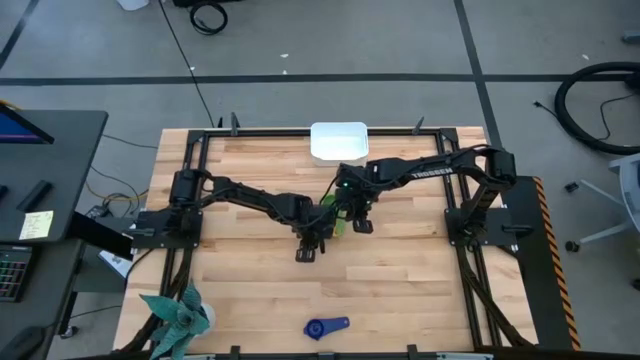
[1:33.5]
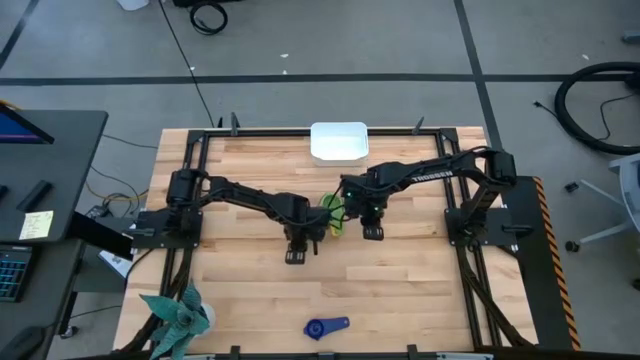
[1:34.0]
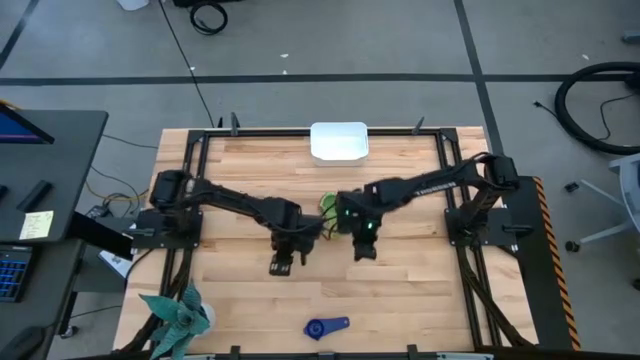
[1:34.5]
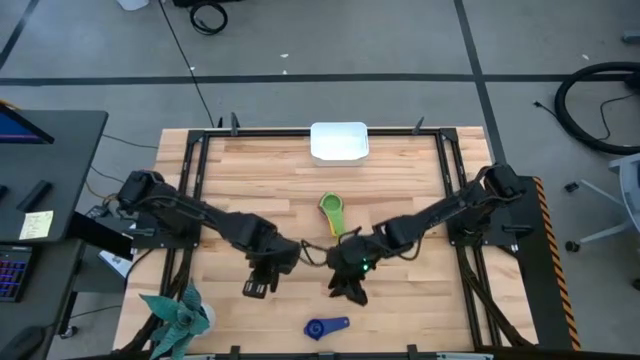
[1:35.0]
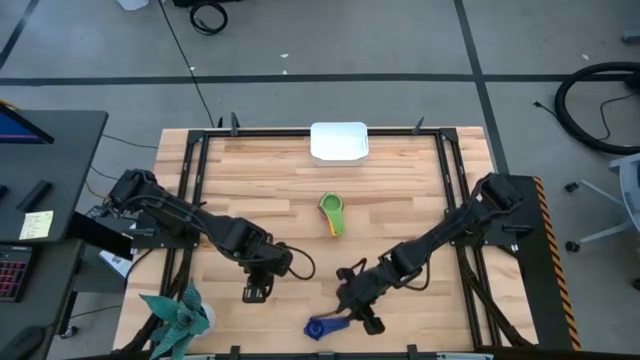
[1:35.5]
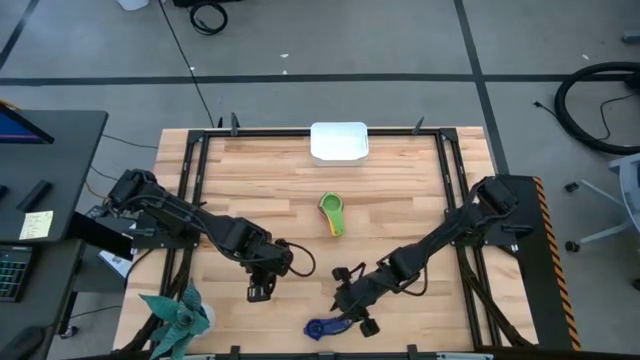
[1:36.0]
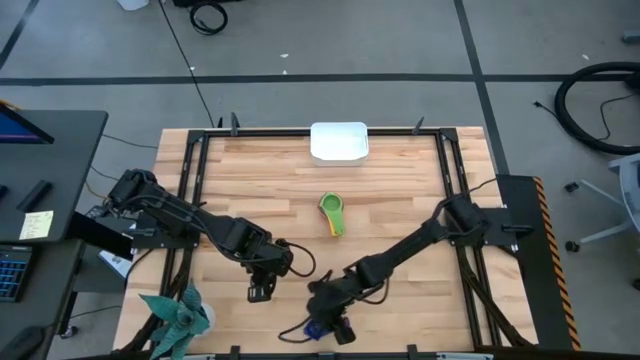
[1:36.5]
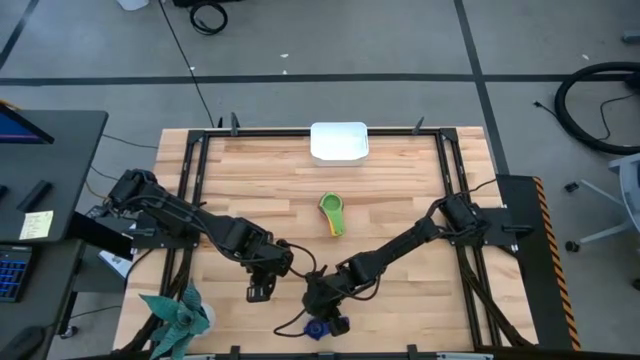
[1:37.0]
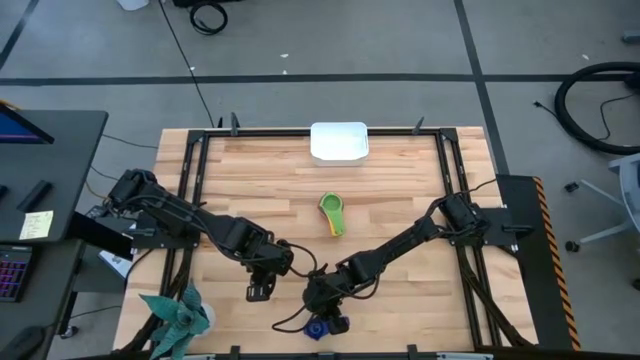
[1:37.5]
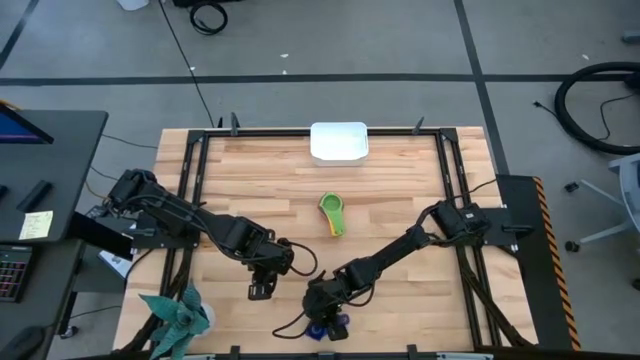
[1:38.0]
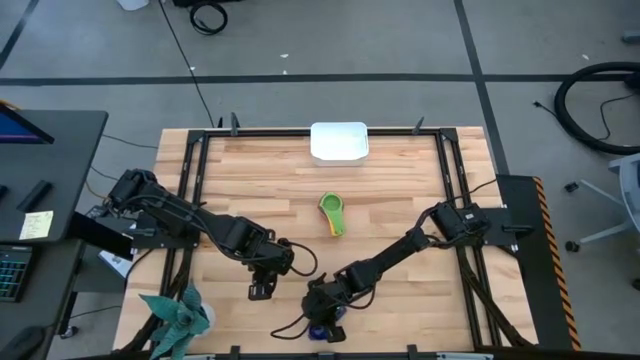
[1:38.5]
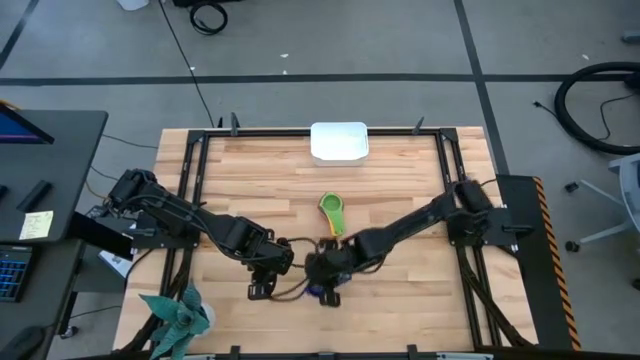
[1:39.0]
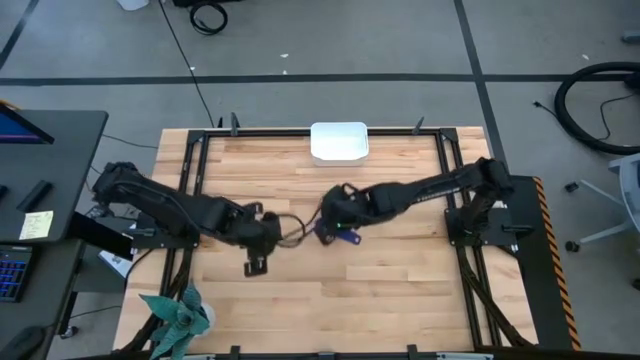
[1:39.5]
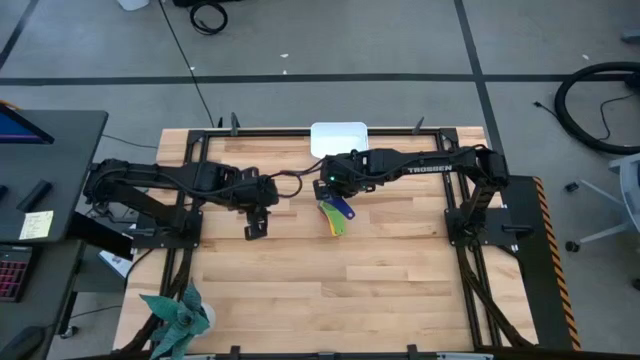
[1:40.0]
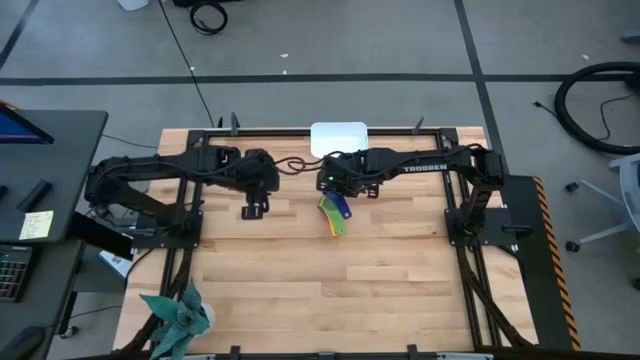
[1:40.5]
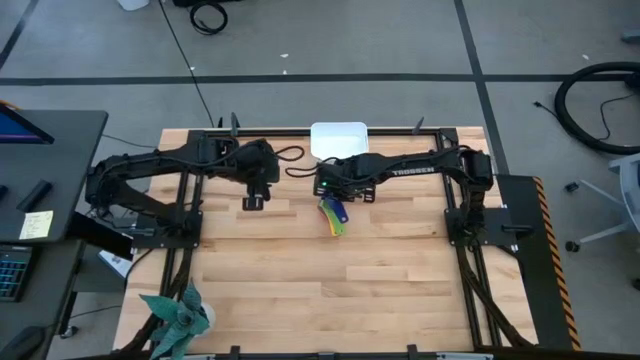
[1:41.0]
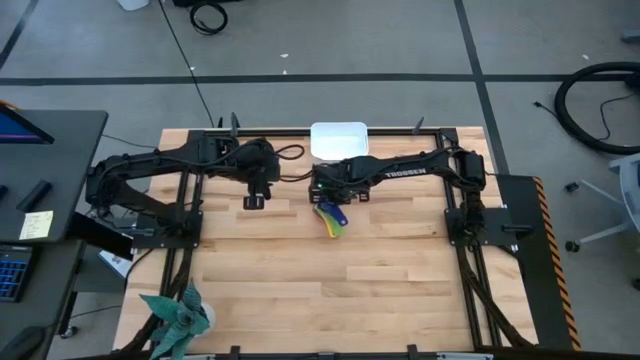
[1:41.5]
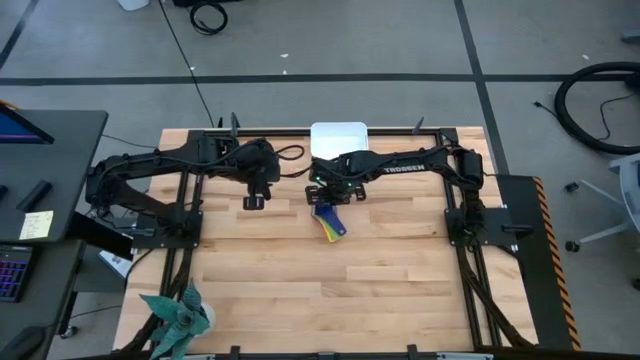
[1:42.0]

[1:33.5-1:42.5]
Task: Nest measuring cups in basket
Stack the dark blue measuring cup on the green measuring cup

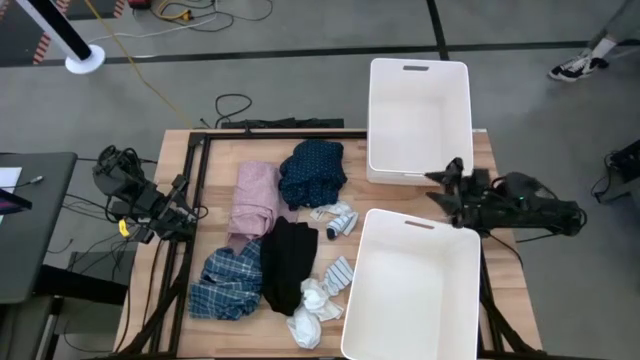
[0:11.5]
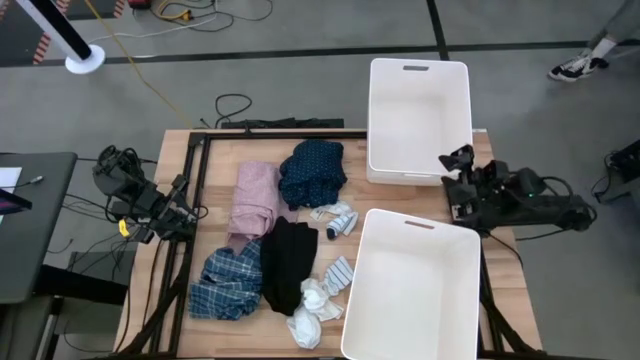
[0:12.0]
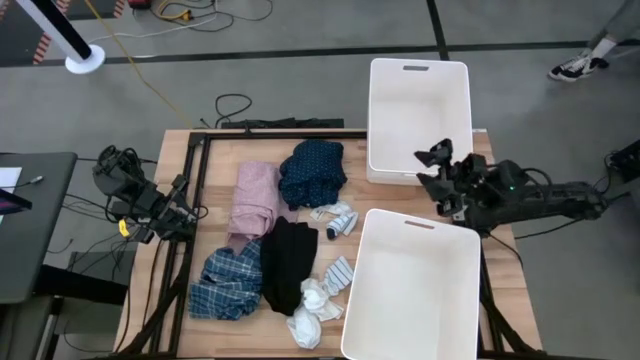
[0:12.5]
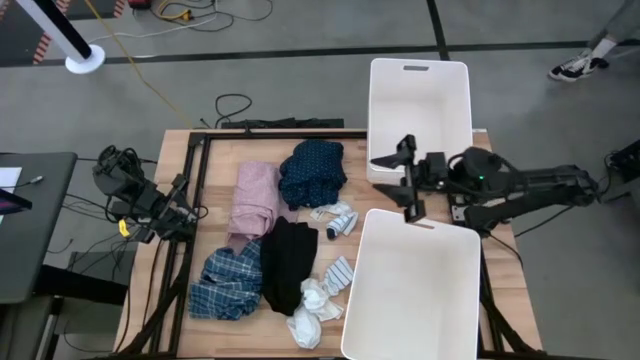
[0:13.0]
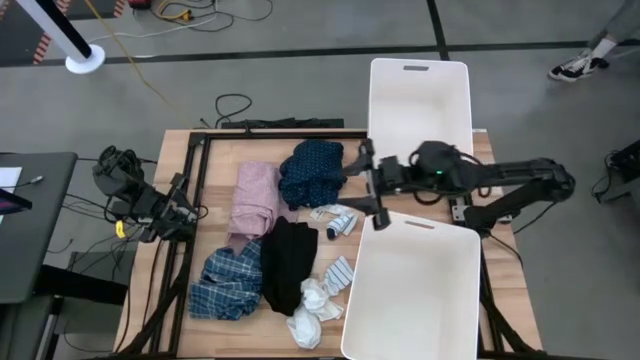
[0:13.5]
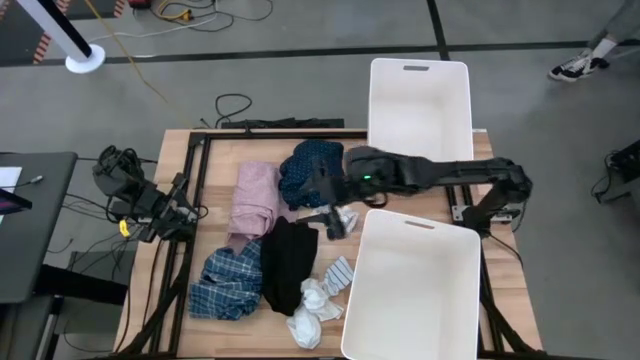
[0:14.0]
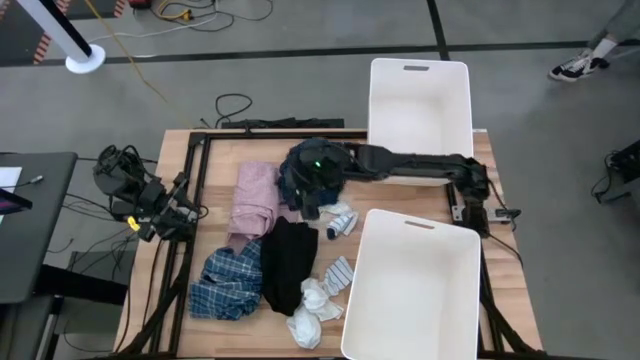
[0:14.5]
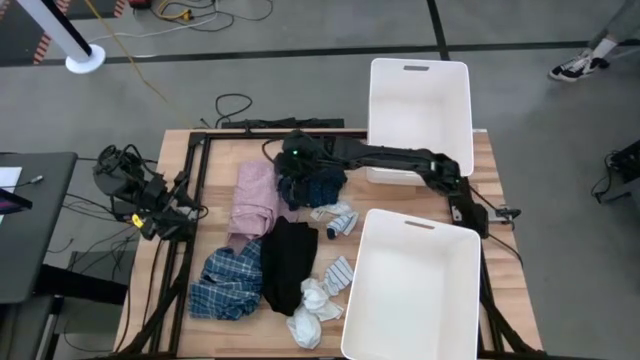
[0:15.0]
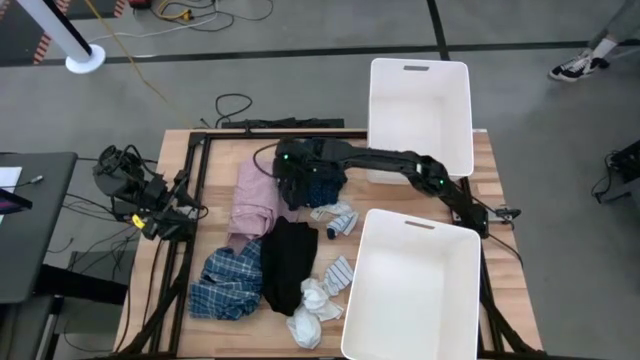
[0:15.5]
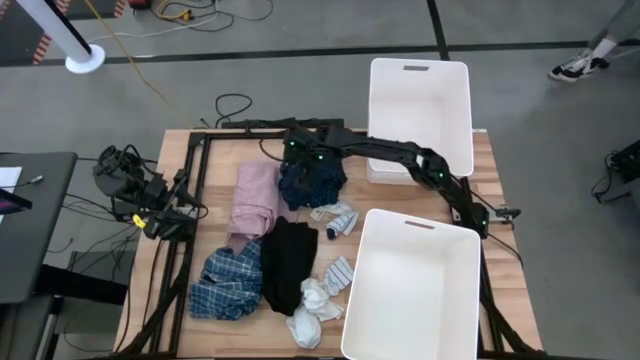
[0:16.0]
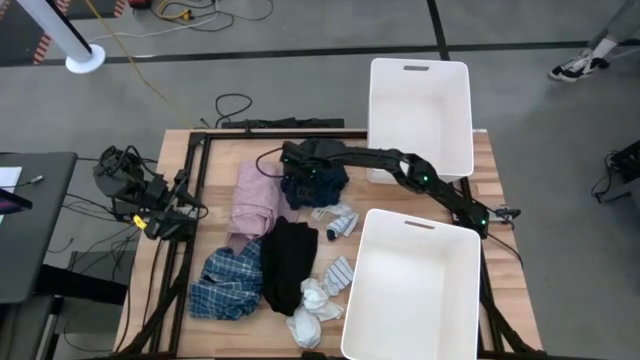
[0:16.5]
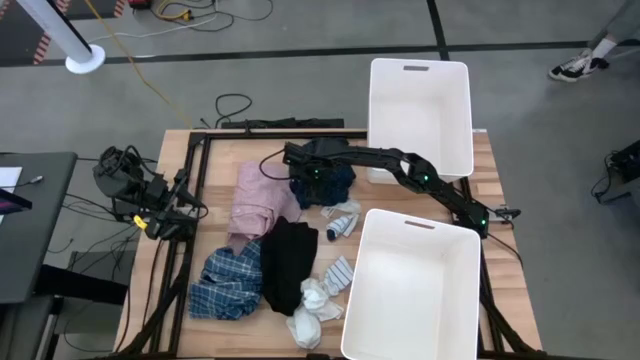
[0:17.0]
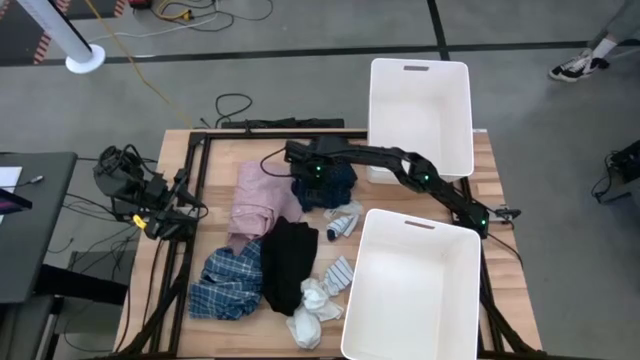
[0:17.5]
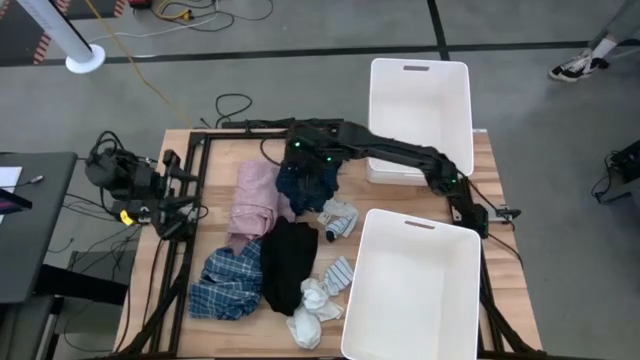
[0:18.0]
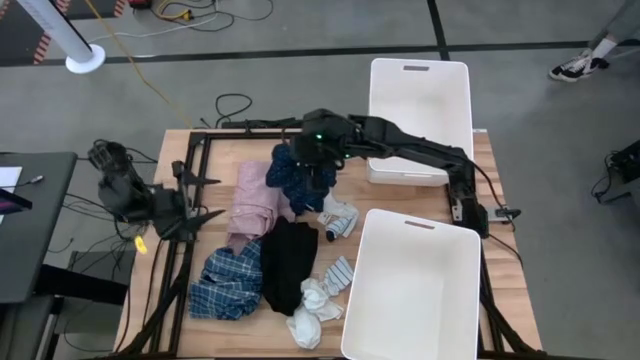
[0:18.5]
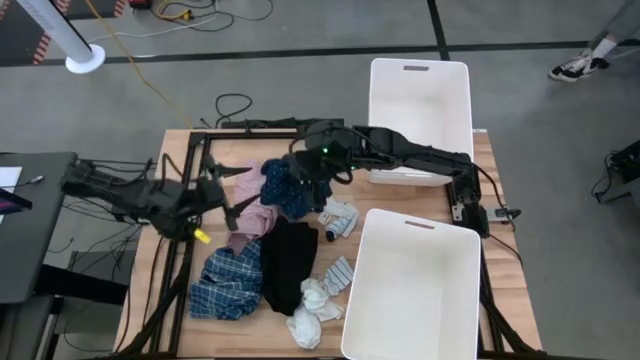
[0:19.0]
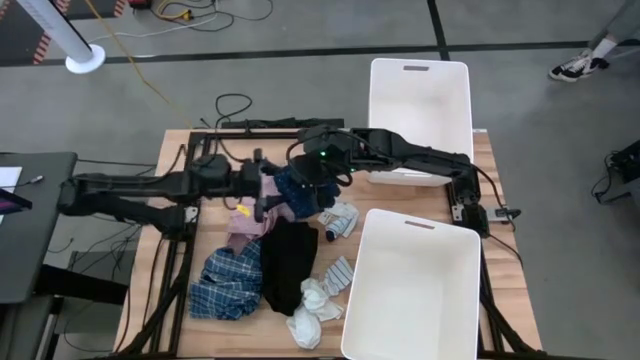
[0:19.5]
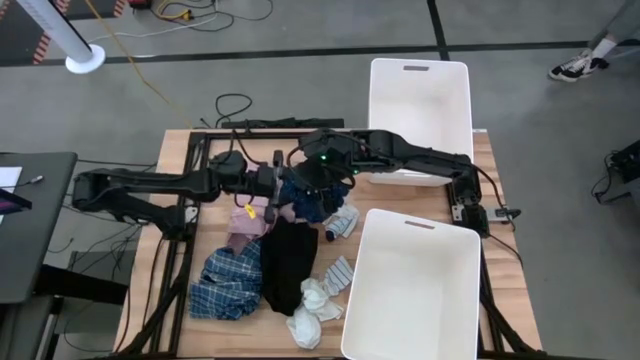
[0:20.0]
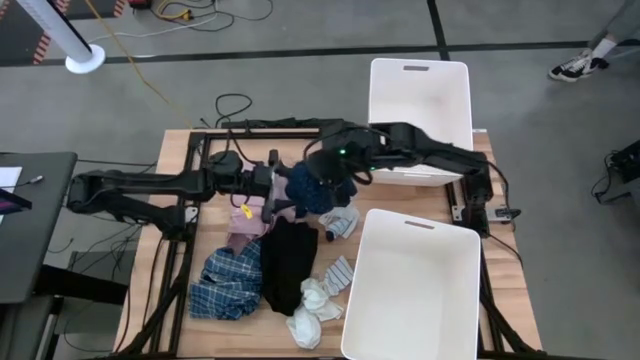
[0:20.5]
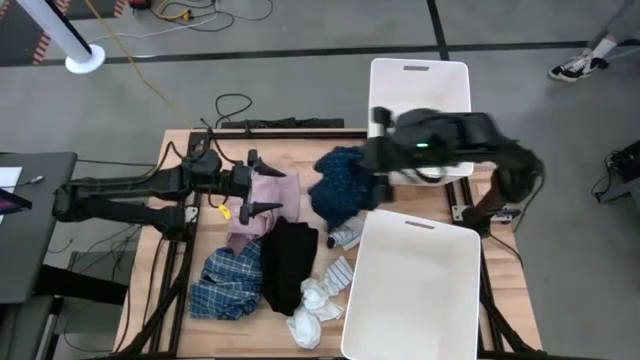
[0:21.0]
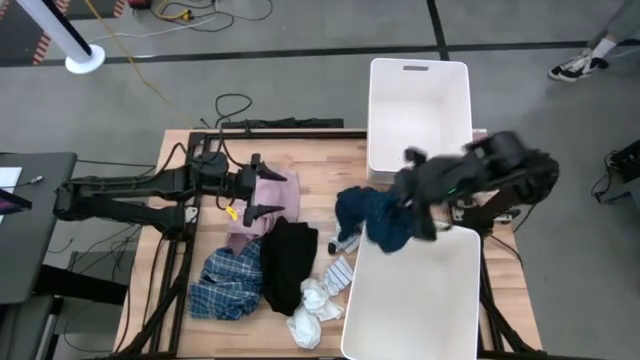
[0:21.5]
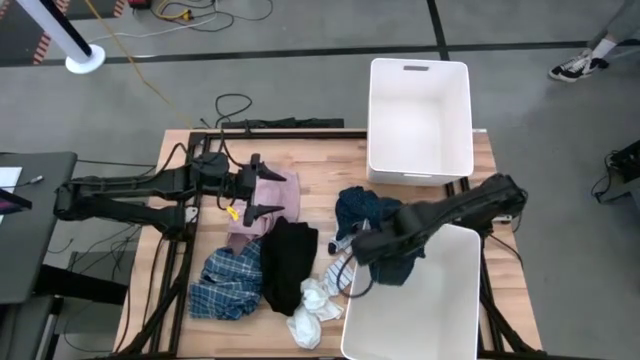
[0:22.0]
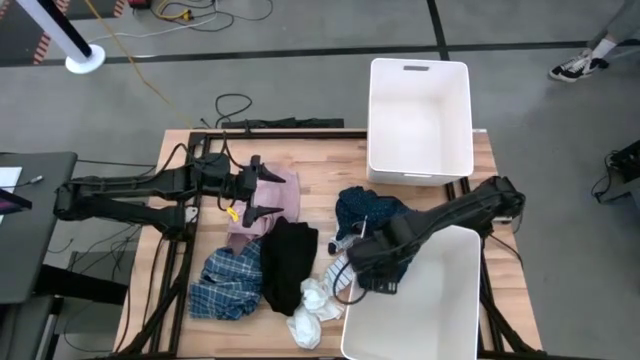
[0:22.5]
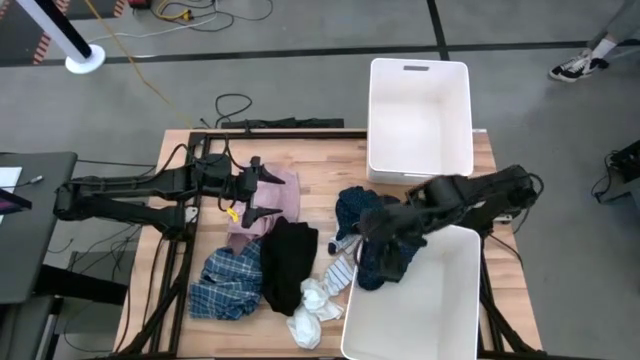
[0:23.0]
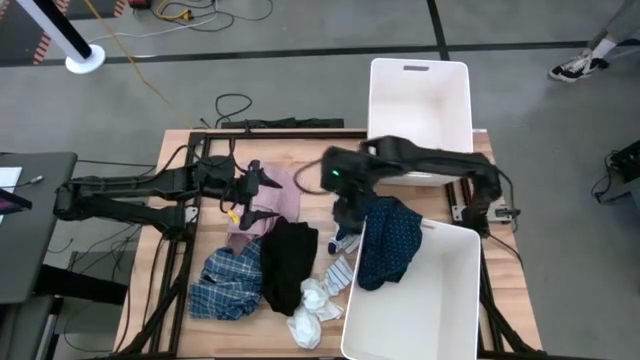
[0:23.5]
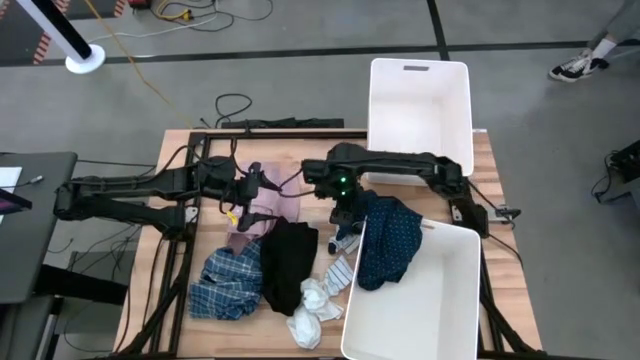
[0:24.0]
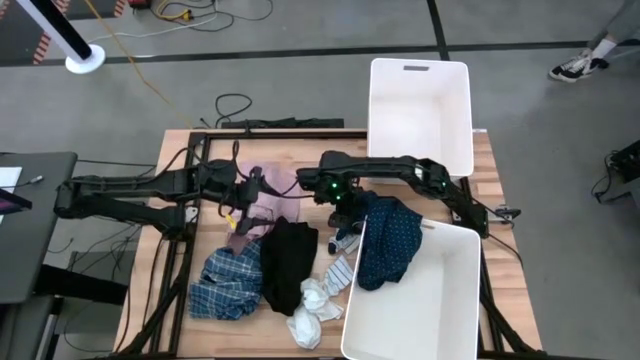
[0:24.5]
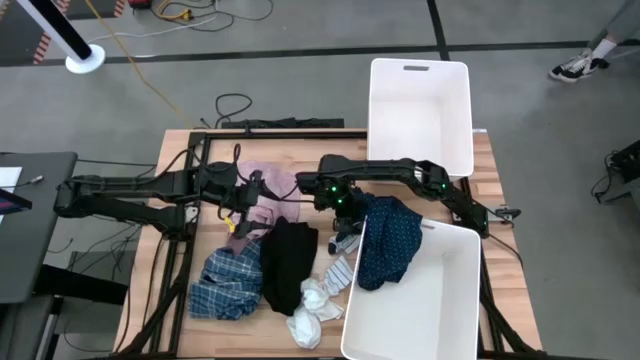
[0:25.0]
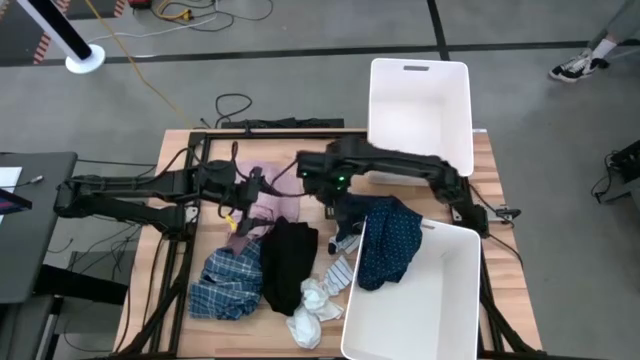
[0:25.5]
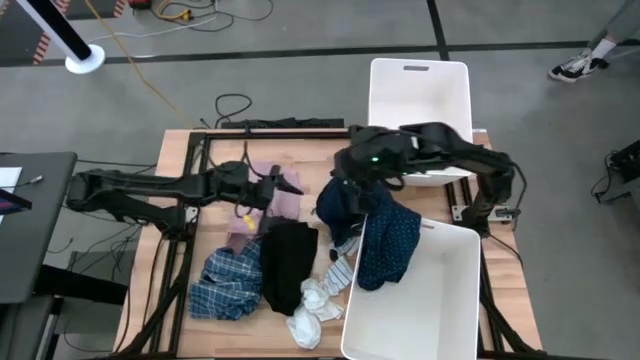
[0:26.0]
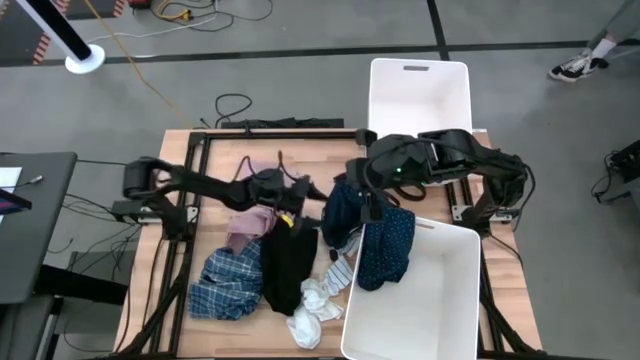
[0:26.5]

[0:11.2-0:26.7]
Task: Sort clothes
Put the top blue patterned polo in the bottom laundry bin
